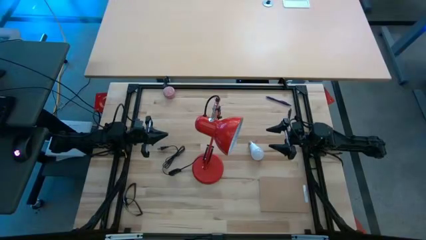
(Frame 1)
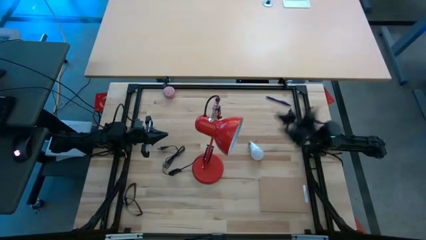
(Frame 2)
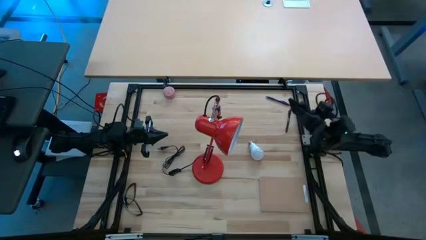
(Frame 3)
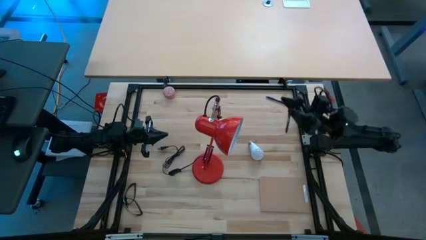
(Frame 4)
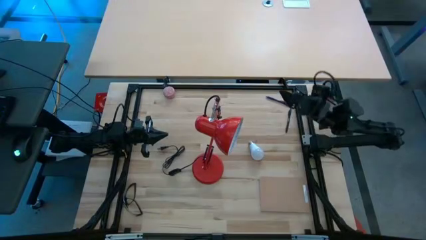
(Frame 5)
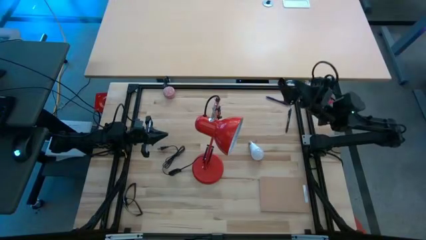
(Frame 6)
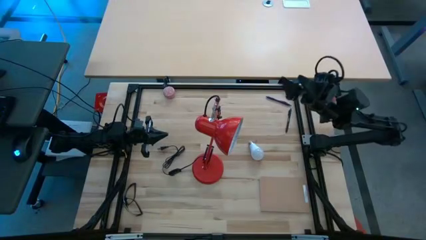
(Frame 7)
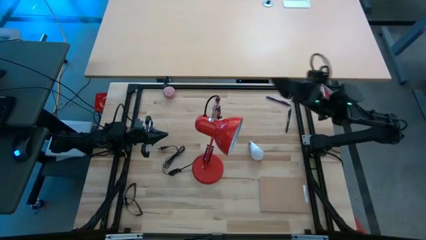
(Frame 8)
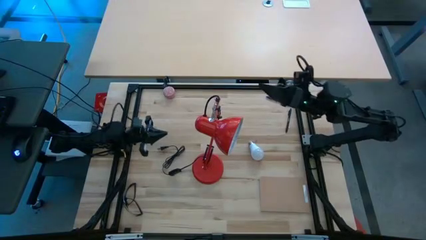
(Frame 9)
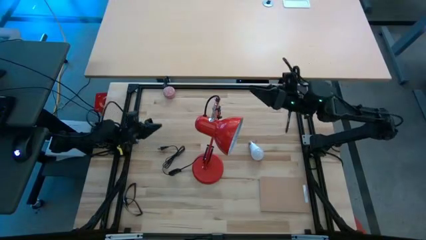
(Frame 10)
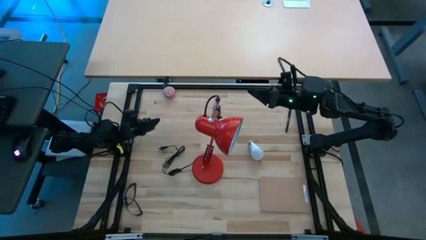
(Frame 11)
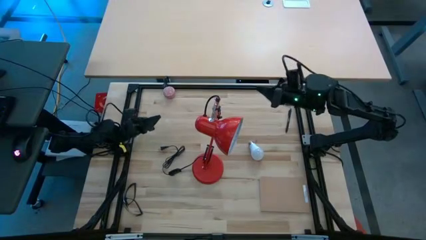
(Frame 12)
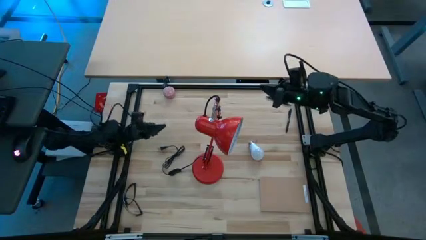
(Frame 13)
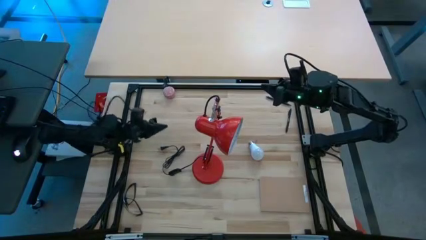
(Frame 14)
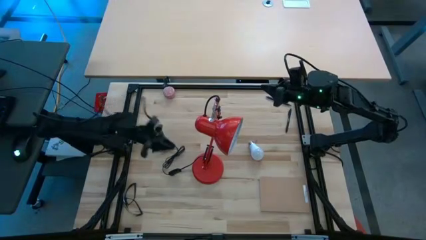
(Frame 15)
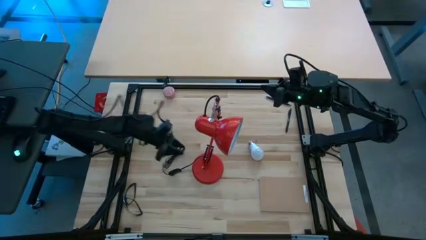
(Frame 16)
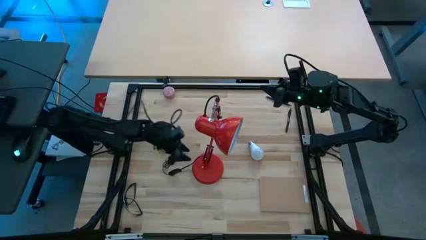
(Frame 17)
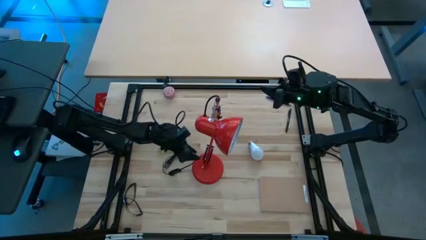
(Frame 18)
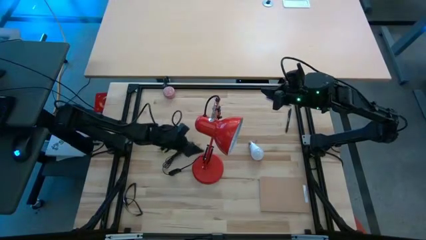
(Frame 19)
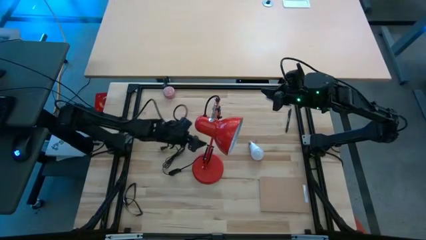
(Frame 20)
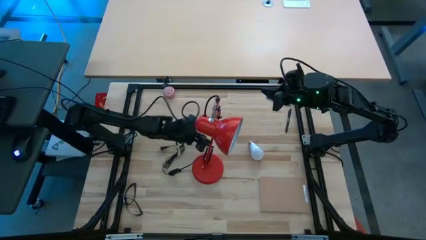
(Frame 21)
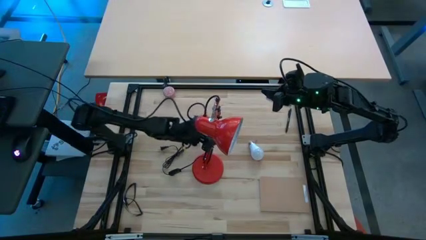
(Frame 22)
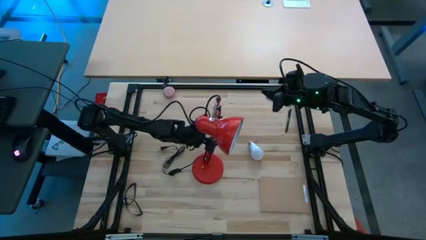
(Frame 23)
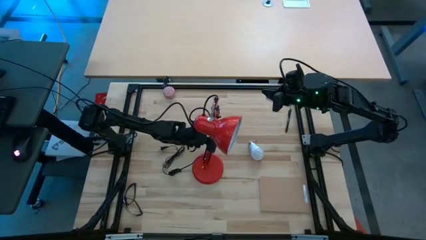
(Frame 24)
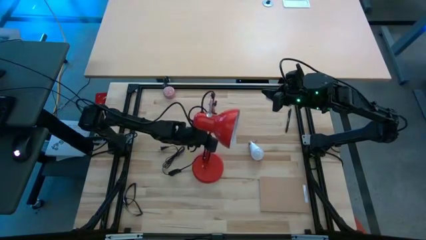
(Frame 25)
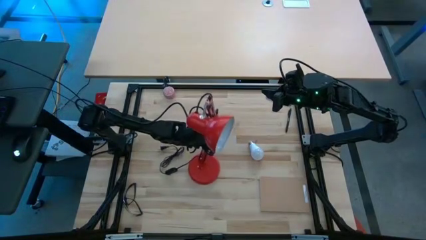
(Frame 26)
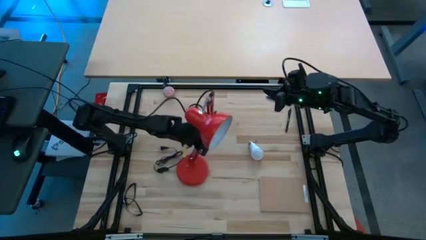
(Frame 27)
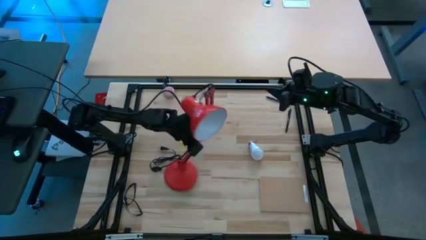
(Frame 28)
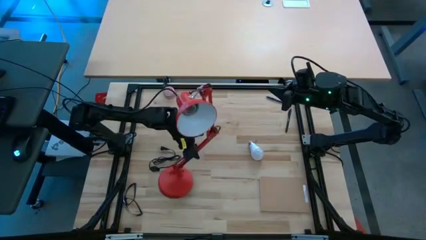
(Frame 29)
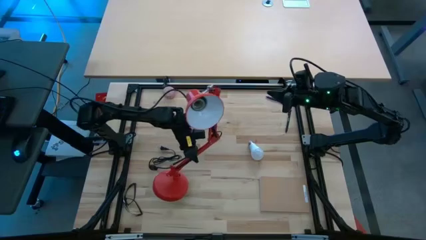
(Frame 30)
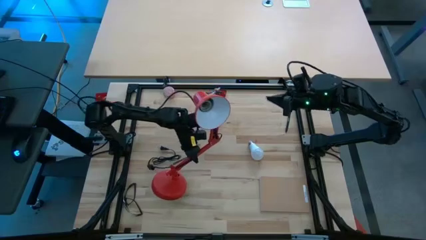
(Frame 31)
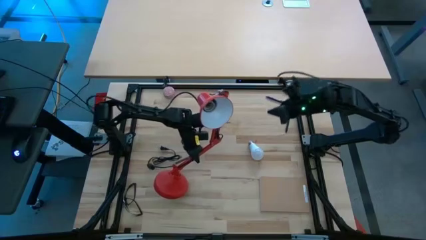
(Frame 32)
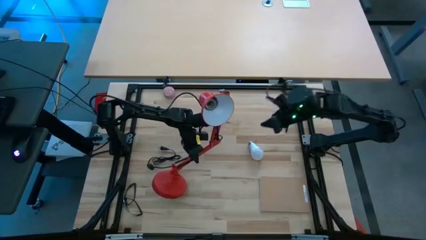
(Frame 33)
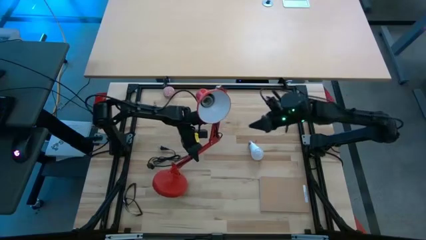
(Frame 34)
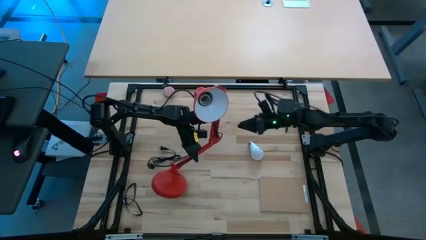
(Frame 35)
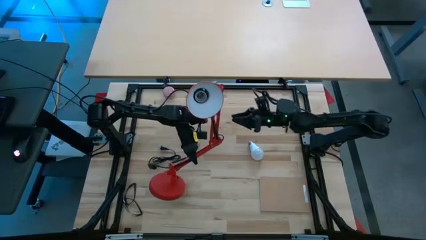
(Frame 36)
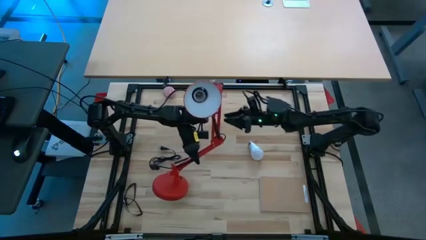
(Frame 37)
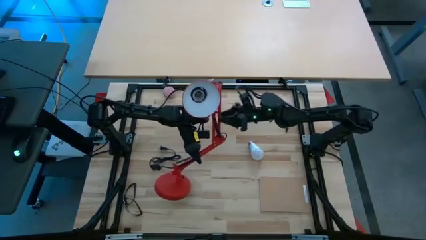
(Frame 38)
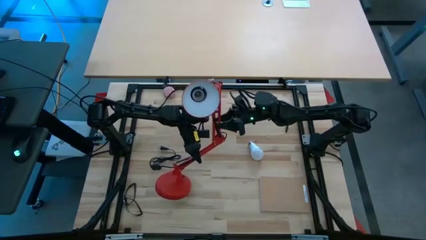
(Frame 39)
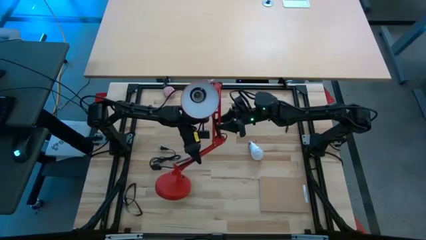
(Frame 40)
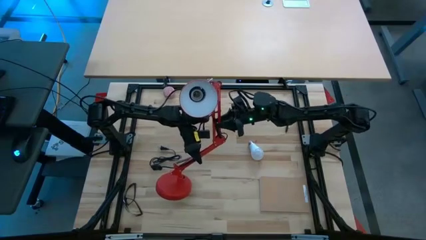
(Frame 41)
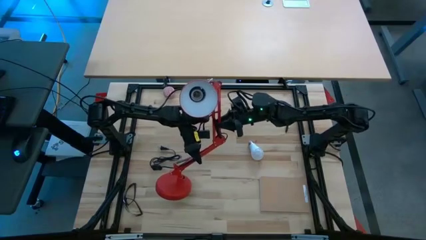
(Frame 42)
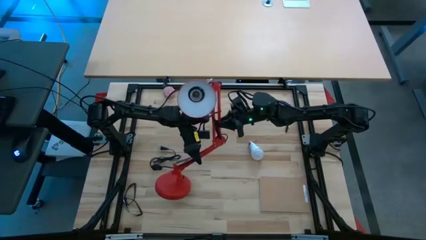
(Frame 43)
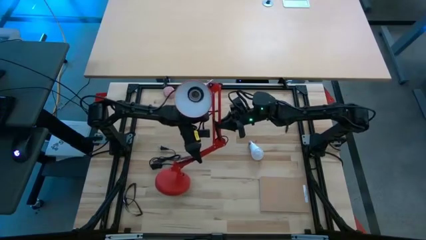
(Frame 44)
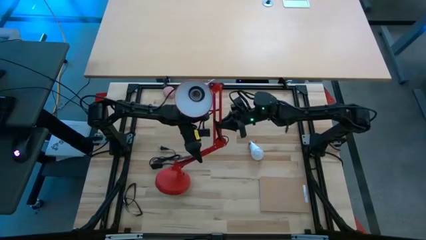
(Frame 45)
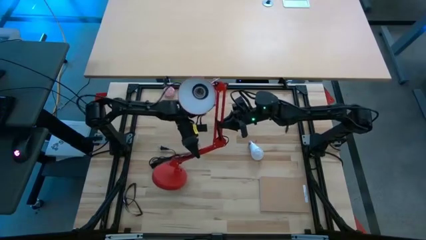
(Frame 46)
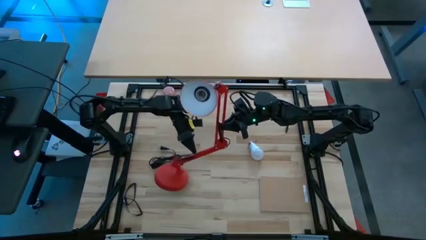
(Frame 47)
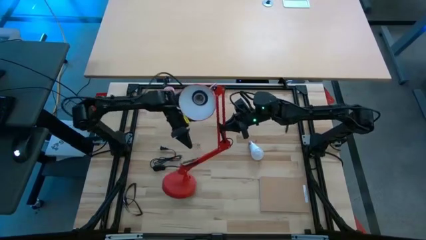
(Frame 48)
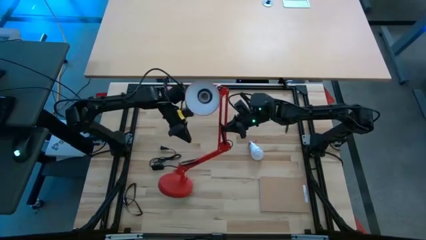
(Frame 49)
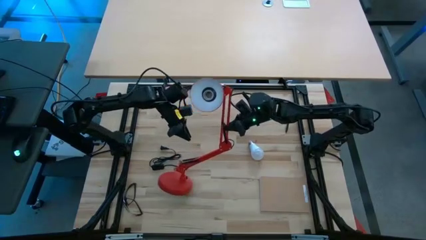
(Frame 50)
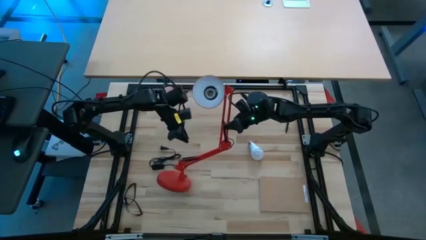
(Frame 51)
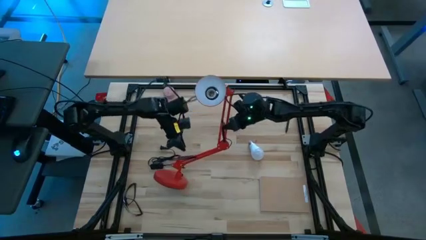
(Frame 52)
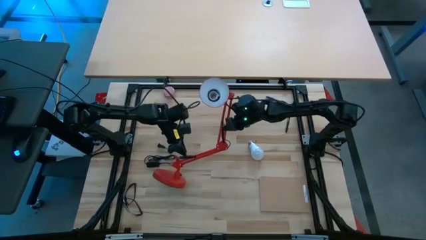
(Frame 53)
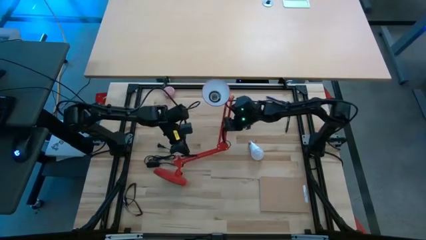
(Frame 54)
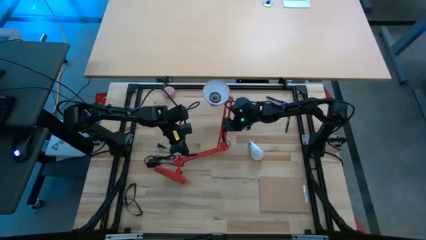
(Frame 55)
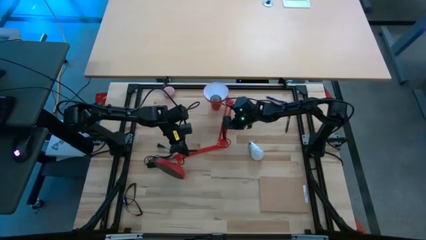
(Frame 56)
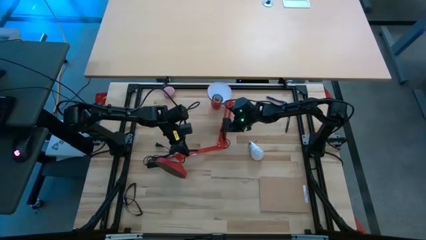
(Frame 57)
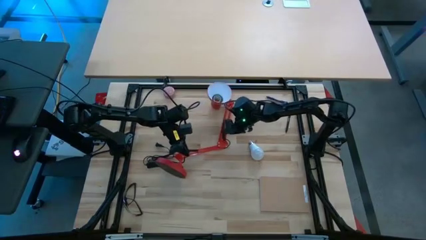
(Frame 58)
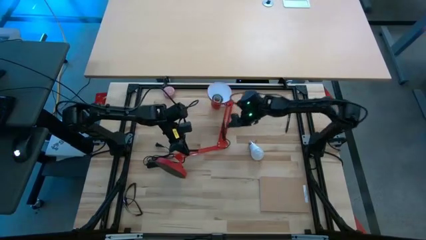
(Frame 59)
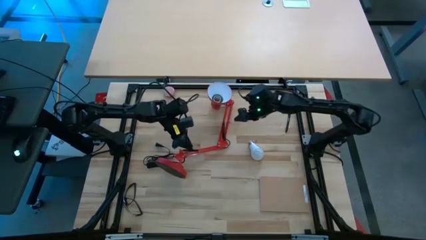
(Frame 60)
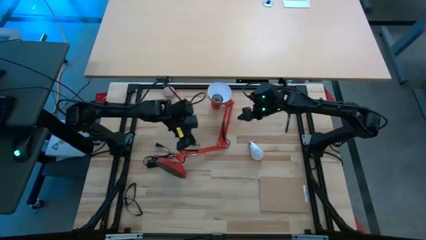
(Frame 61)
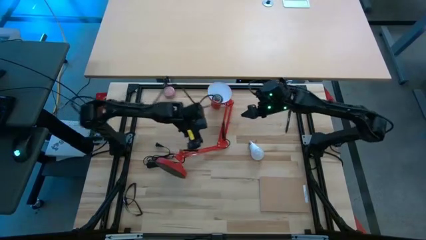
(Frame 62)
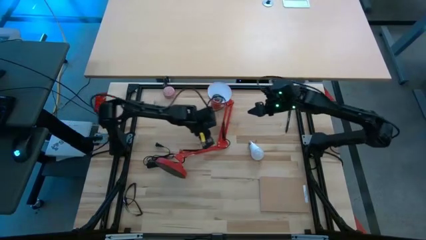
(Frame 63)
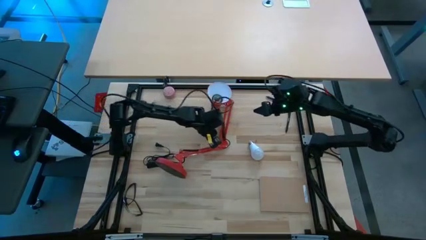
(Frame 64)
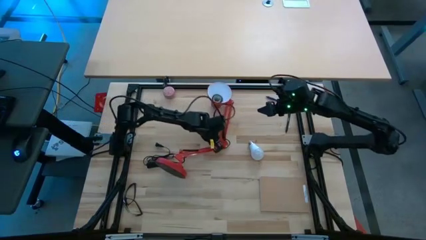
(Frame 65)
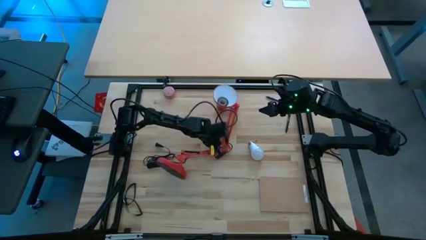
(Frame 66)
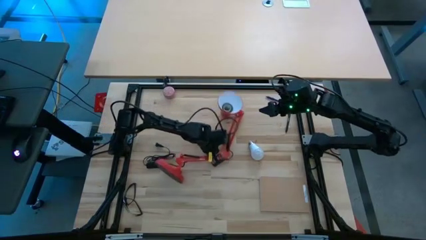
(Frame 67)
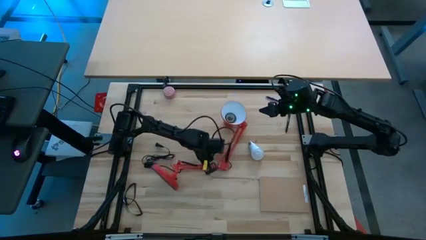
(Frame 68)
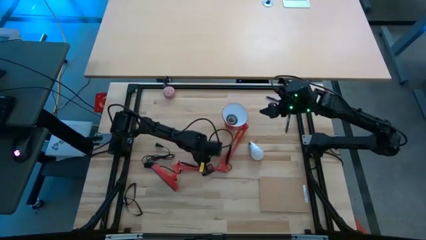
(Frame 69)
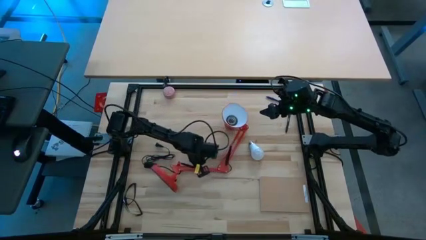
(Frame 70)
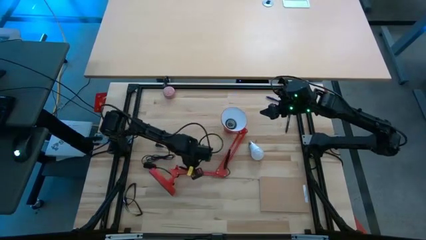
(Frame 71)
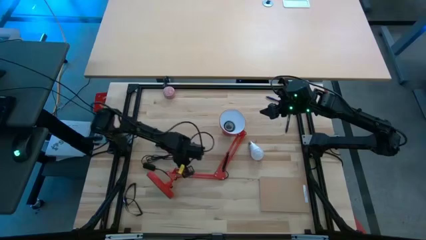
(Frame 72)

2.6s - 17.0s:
Task: Screw lightbulb
Prepare the desk lamp
